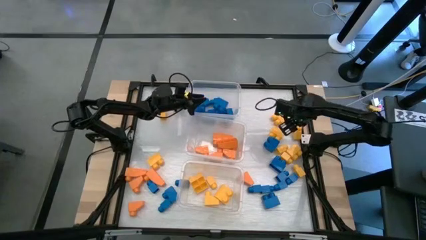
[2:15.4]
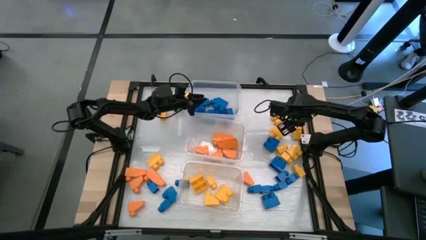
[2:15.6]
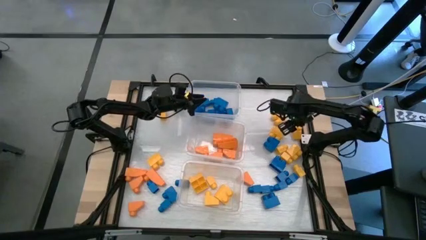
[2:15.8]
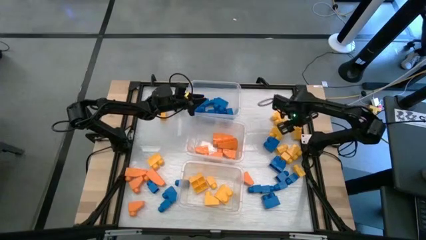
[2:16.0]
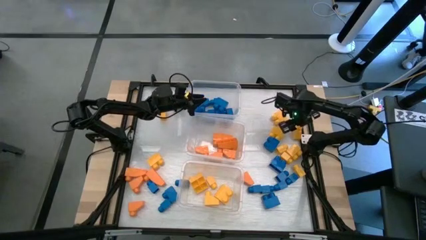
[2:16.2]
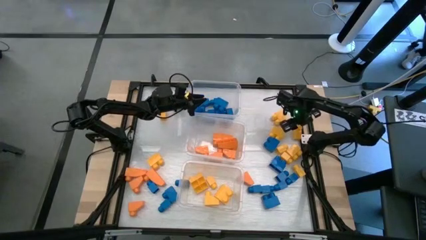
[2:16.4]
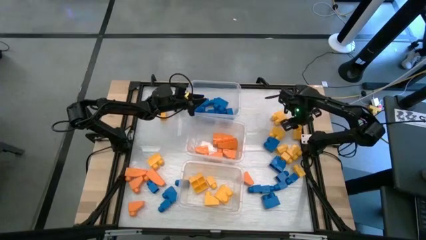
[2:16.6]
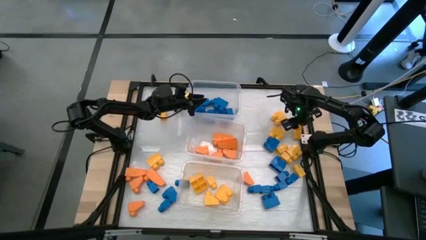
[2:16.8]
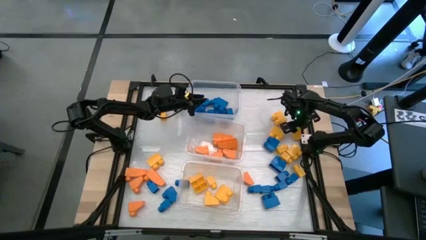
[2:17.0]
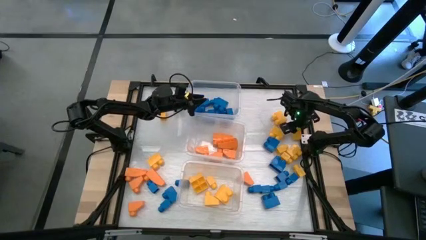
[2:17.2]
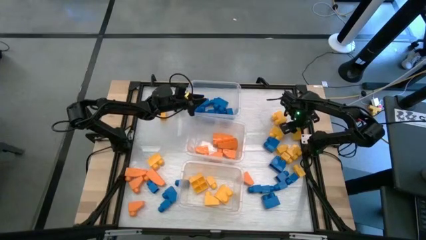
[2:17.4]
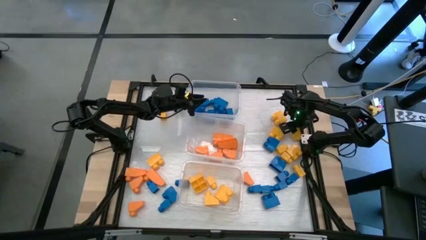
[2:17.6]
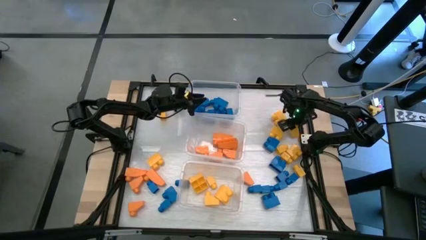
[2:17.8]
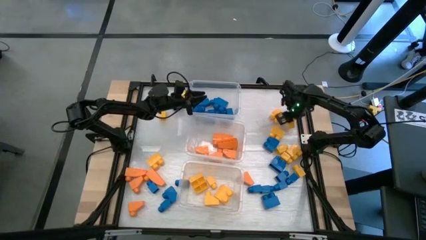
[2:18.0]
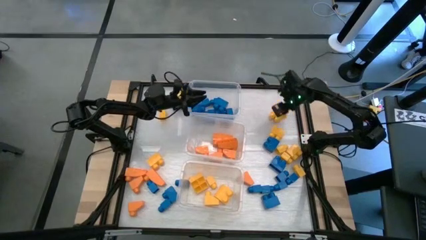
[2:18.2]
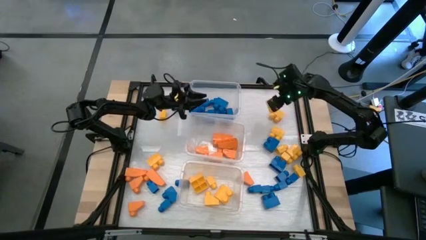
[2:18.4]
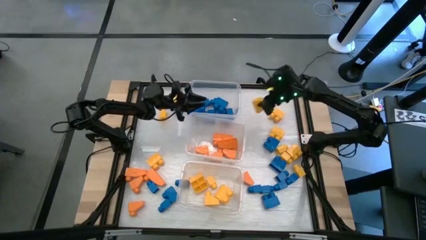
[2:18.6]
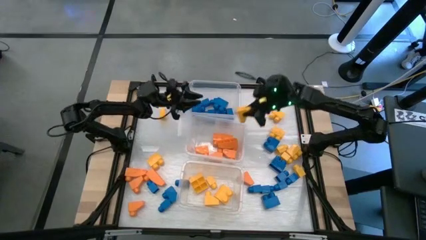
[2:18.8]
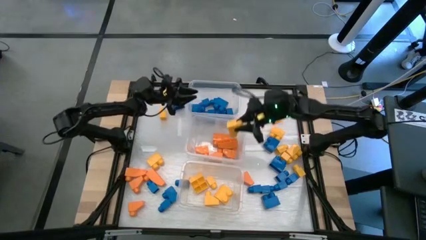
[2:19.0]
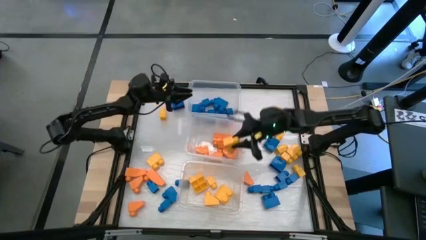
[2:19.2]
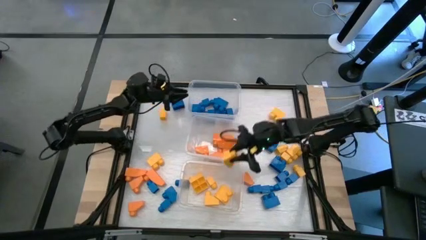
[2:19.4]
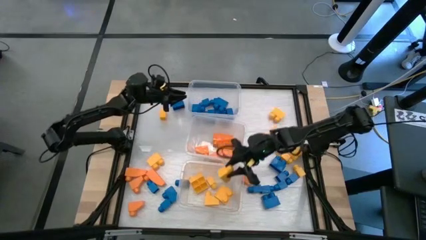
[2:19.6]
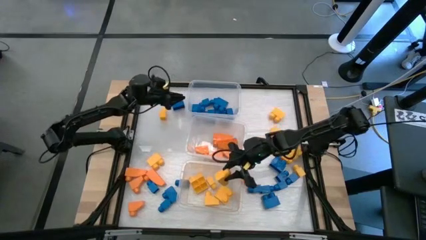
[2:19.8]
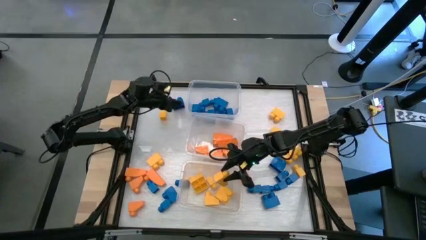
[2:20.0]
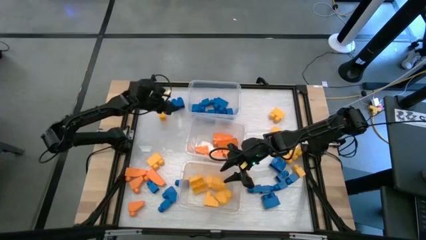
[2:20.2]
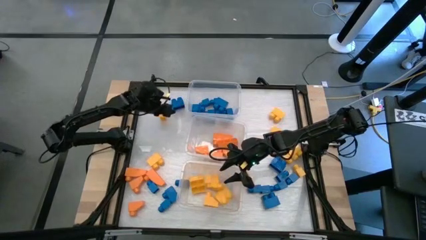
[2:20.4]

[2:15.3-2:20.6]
Task: Sort blocks
Put the yellow game piece into the bottom transparent bin

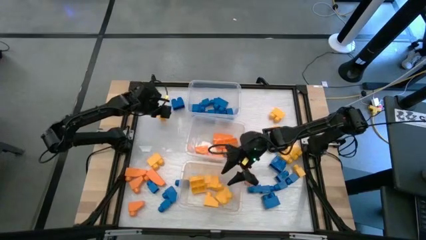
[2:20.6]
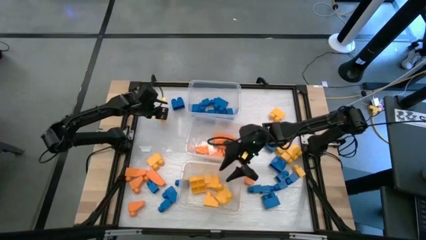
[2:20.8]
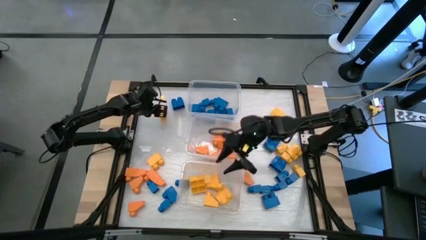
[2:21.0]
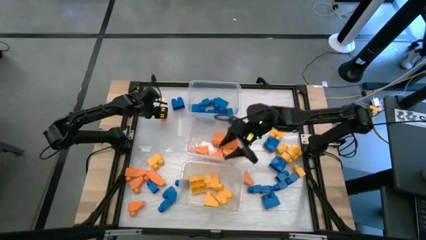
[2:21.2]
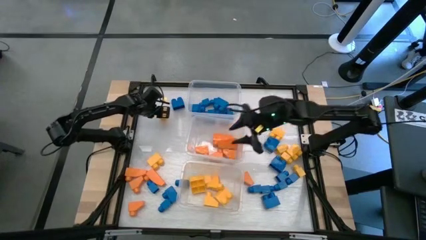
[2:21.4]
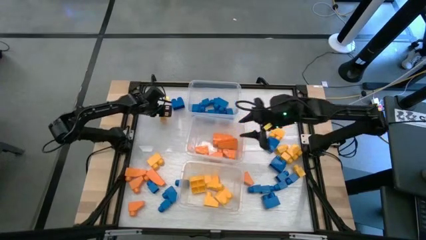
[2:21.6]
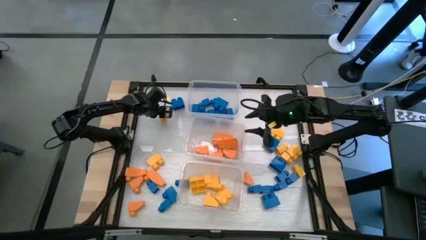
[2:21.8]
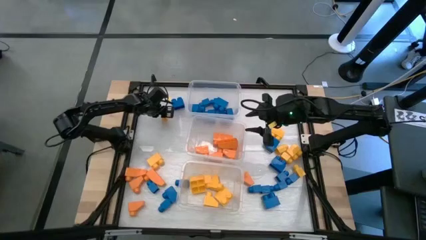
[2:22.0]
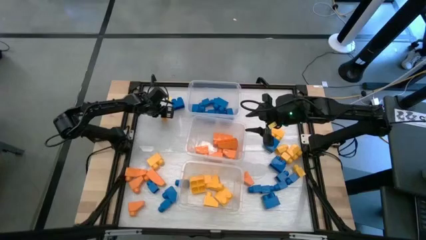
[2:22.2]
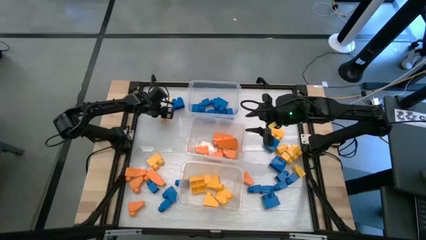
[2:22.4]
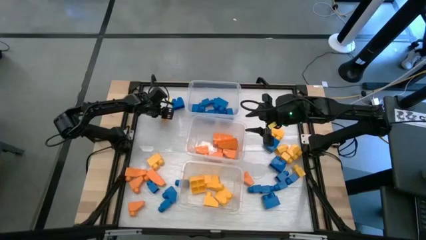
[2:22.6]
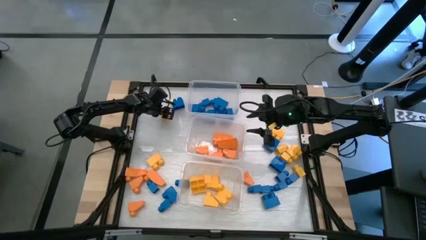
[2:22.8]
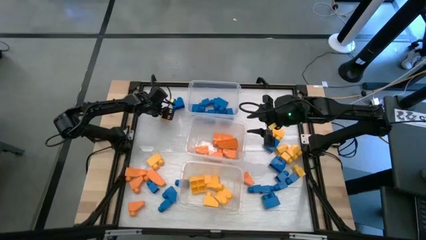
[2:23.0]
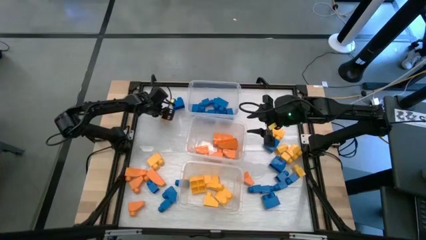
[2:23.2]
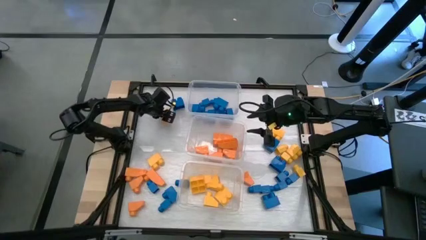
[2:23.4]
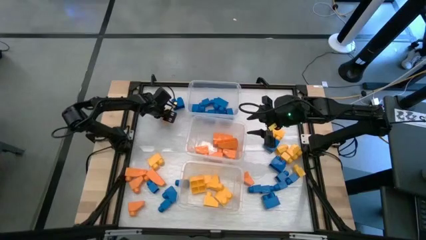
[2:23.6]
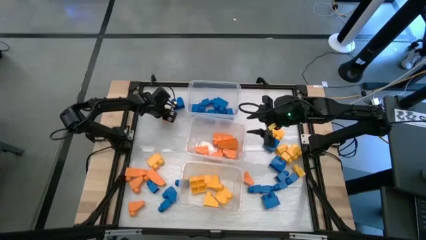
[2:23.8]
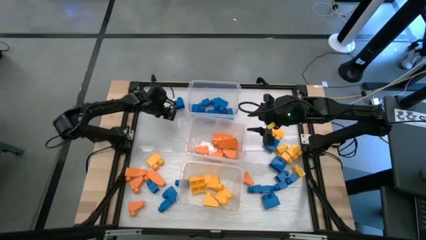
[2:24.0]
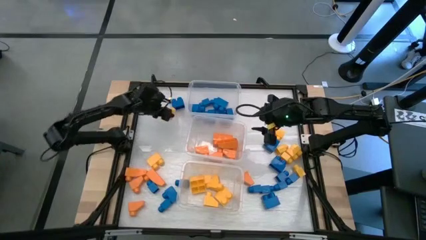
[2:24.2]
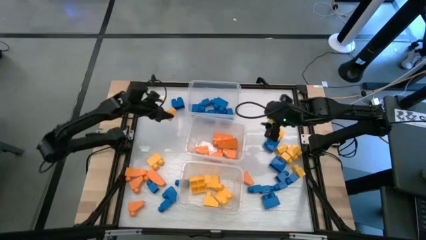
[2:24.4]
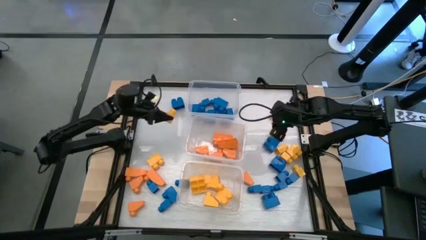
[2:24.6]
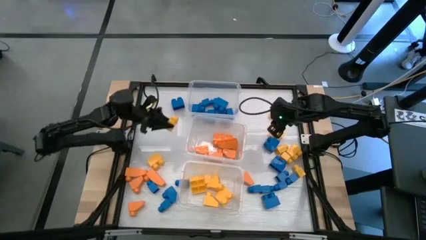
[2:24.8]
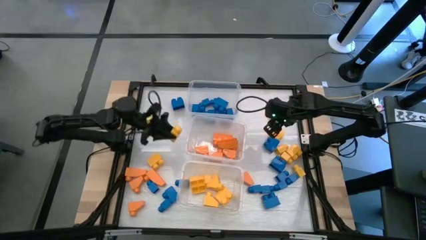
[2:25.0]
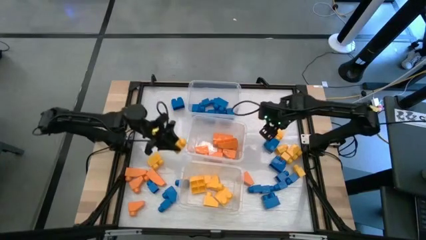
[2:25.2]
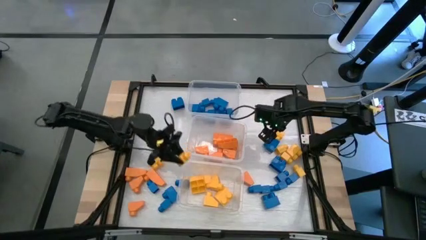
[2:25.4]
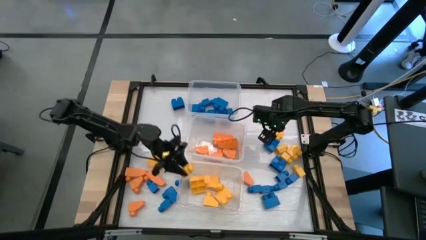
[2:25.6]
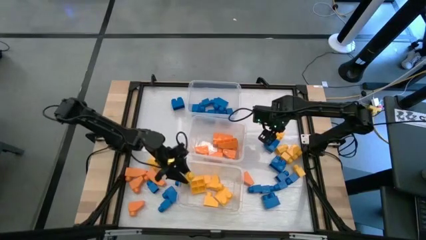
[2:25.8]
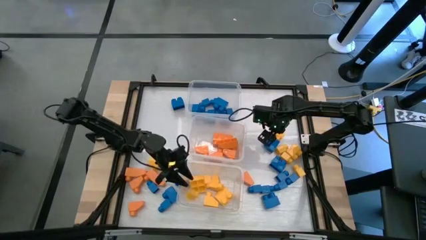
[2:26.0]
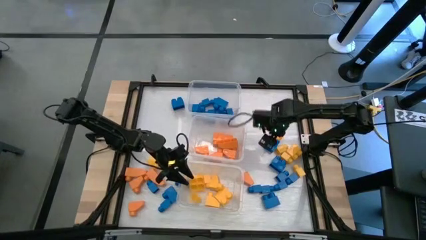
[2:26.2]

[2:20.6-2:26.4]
Put the yellow game piece into the bottom transparent bin

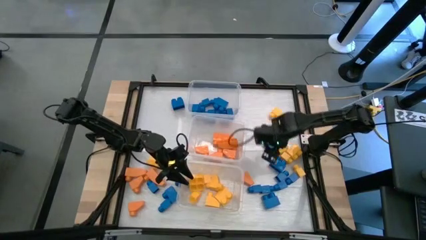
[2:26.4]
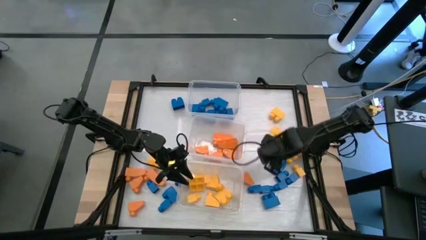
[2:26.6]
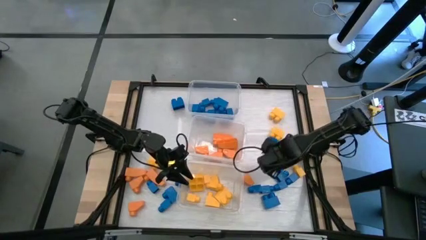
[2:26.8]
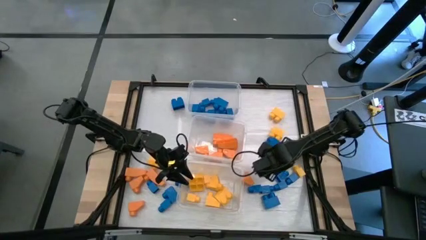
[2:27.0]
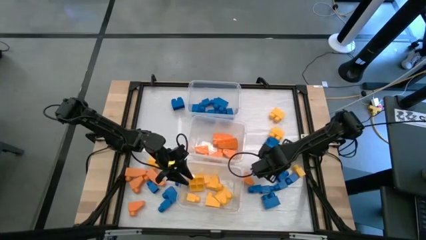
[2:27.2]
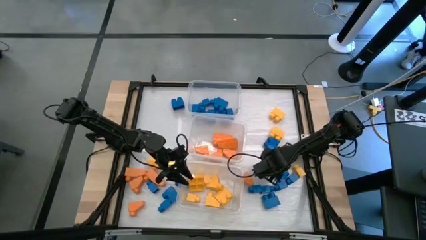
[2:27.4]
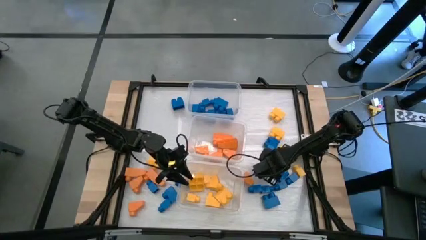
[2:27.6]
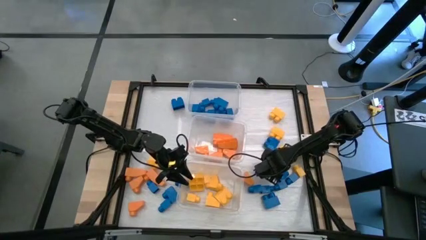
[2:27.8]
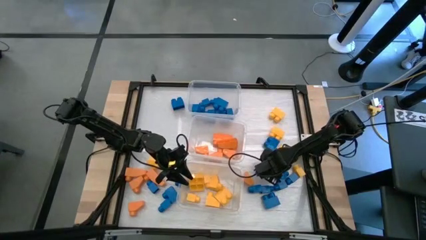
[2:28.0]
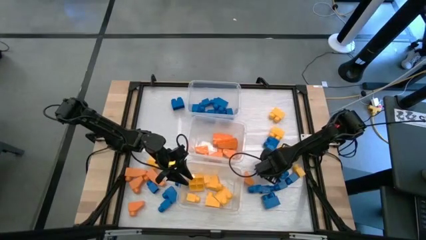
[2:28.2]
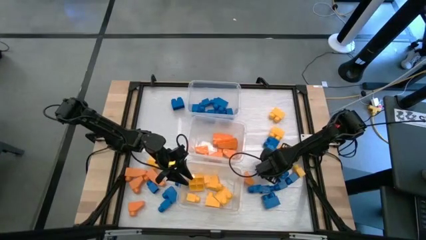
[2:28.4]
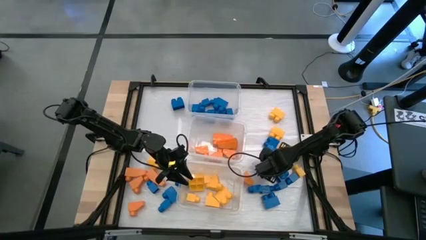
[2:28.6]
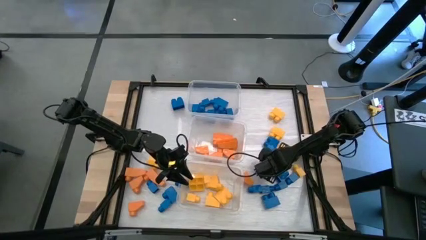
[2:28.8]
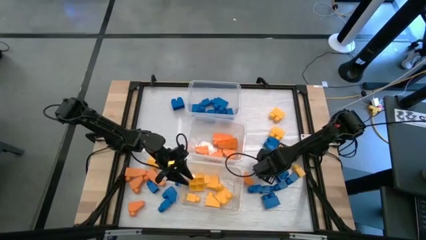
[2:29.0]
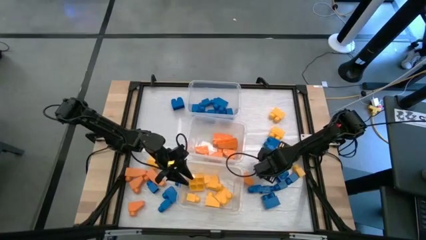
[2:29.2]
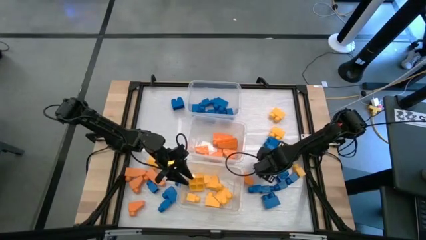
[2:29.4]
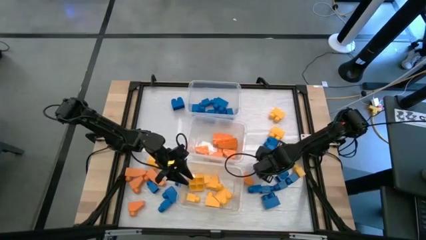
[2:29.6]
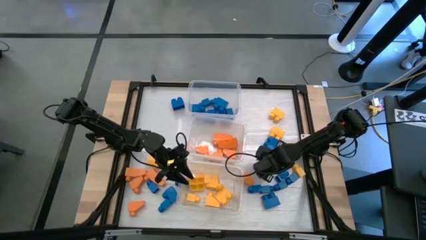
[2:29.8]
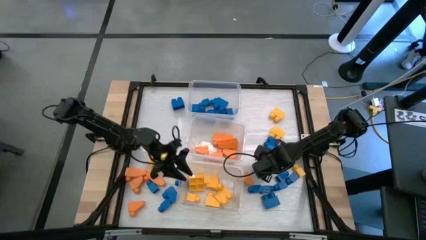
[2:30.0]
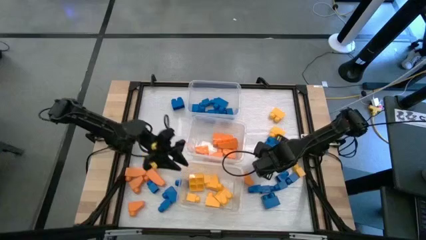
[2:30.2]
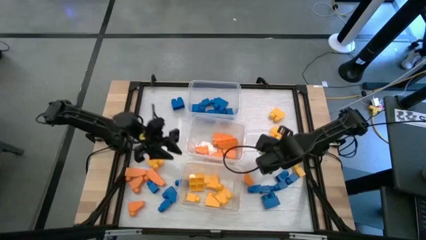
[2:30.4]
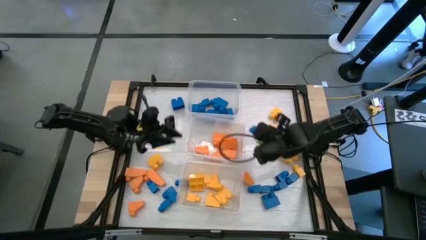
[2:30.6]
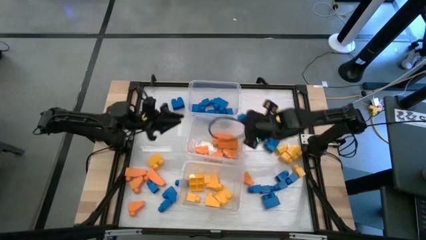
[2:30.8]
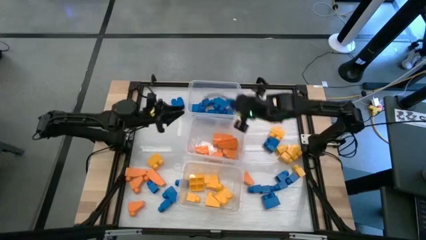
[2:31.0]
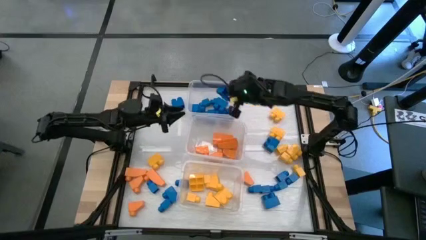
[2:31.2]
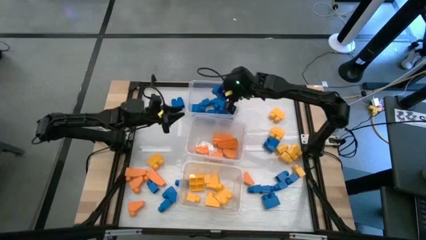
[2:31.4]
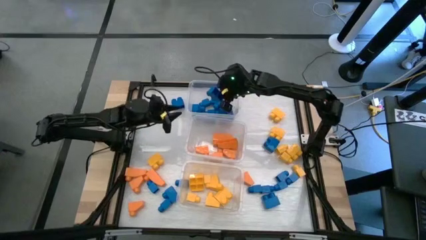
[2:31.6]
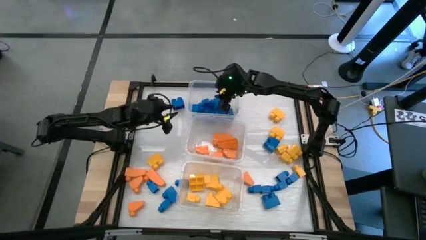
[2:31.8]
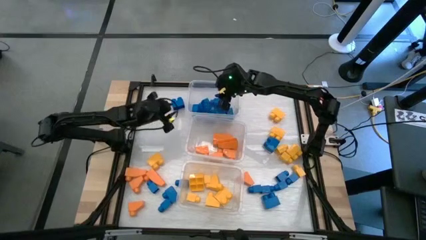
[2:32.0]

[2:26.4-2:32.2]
Put the blue game piece into the top transparent bin
